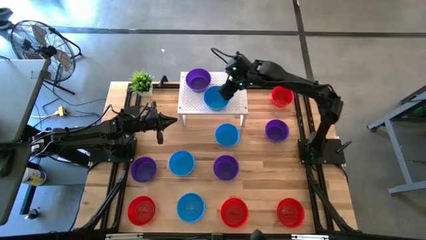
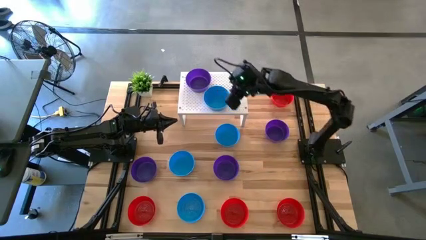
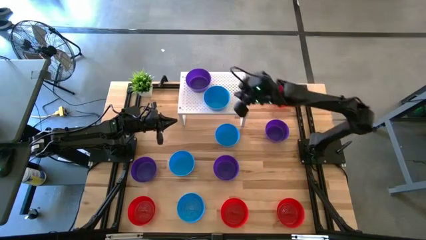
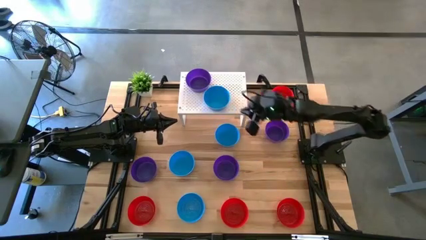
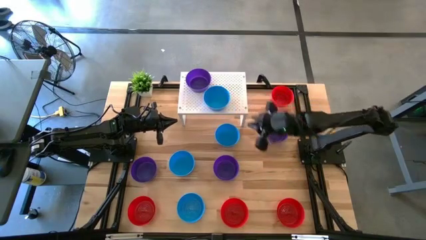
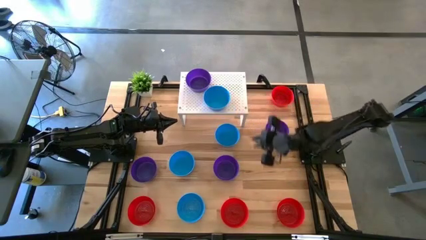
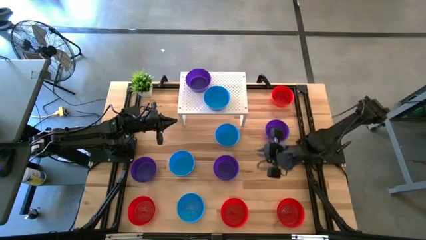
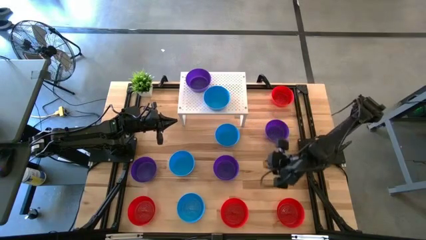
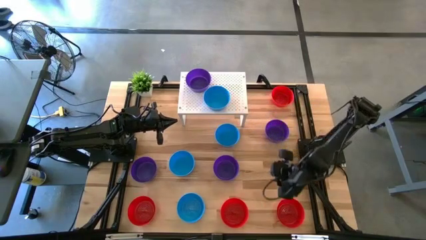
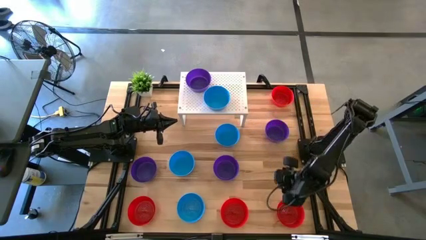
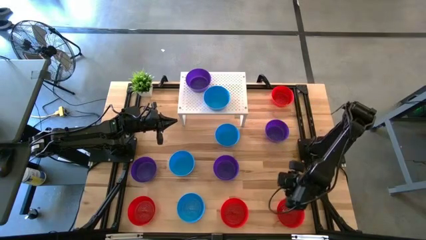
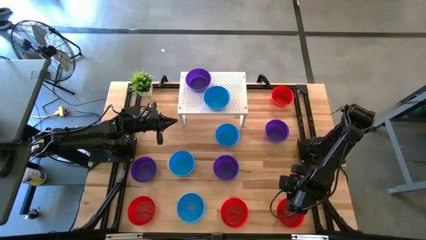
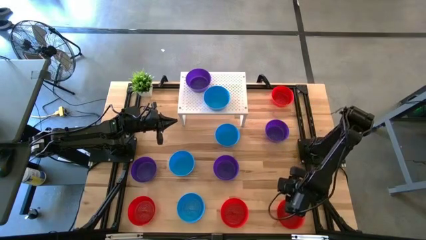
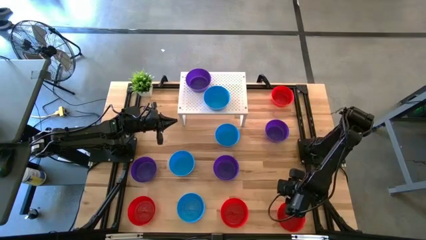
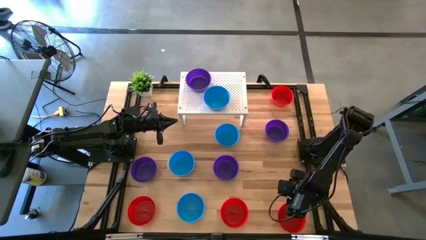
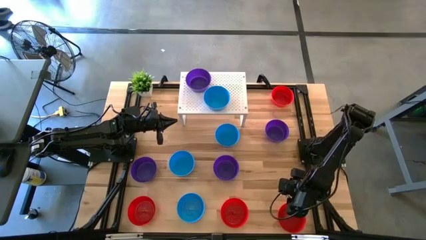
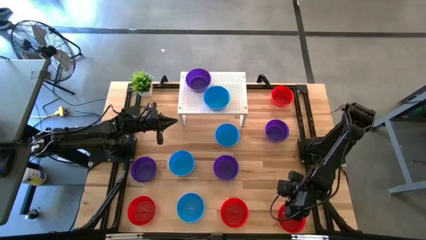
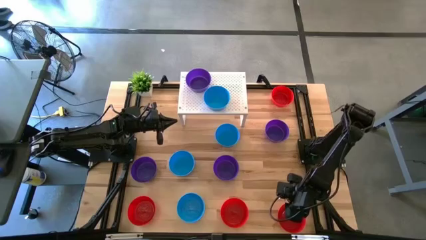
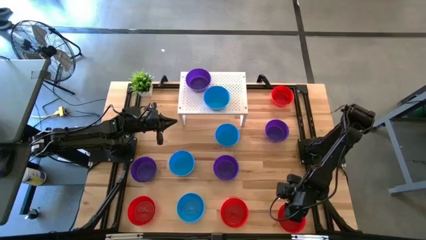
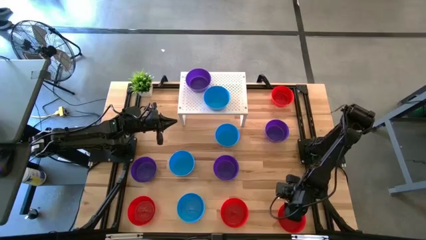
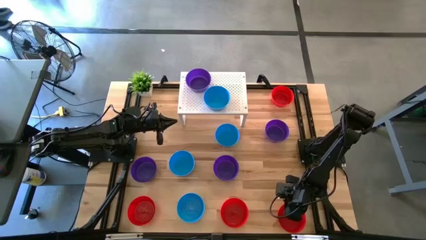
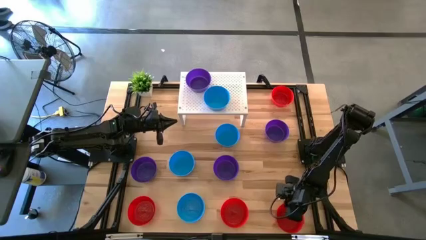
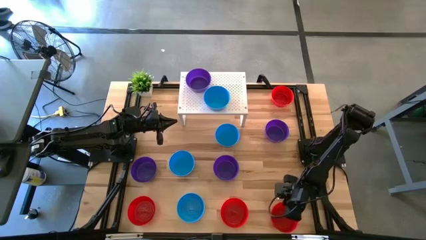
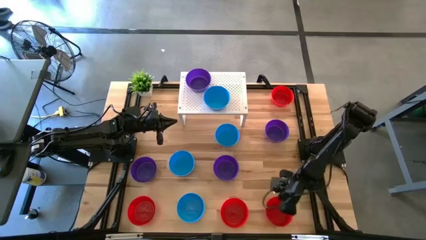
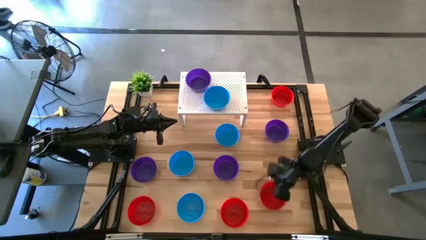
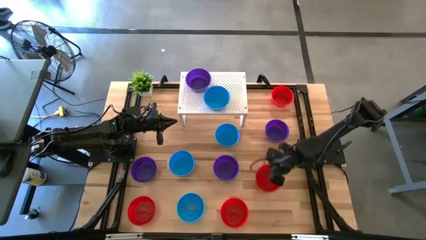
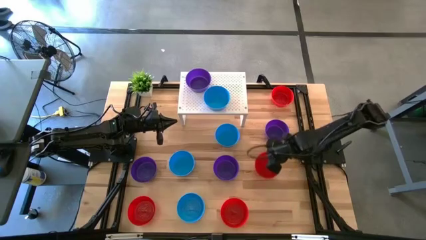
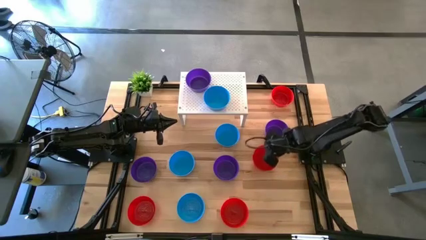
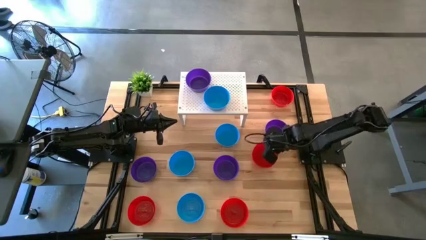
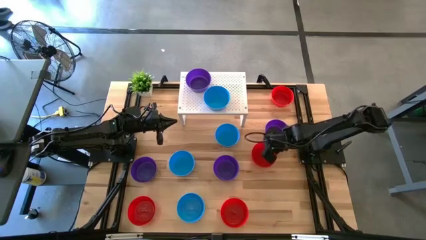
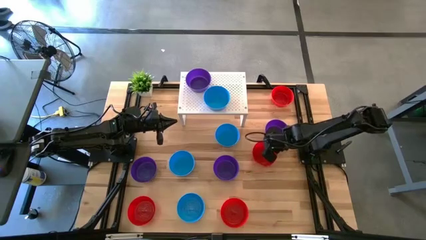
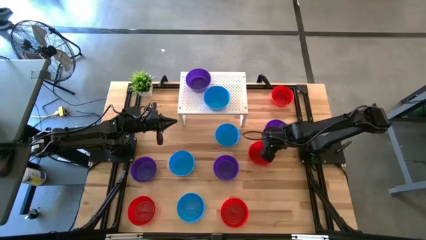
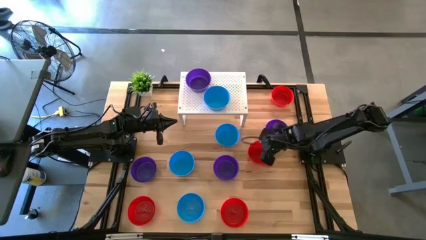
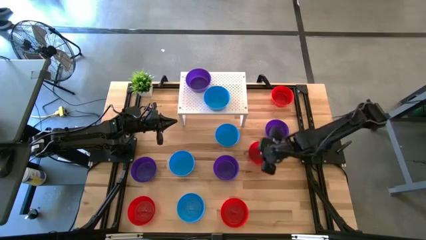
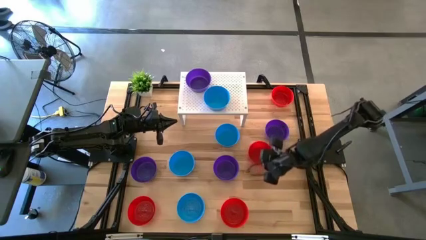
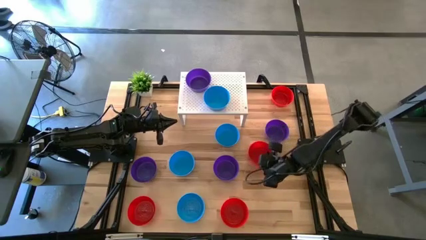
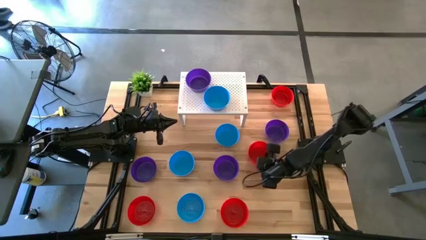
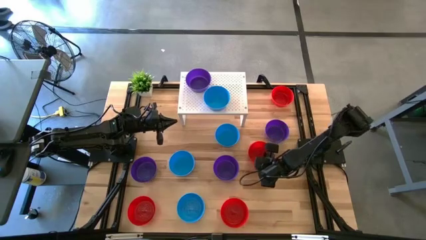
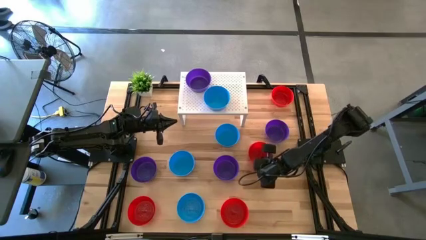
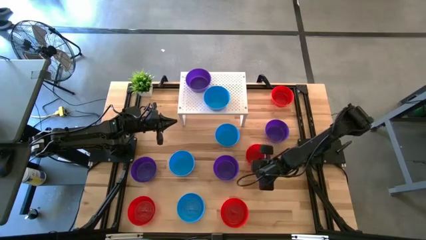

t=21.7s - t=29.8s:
Task: Pick & Place Mini bowls
Put the red bowl on the shelf

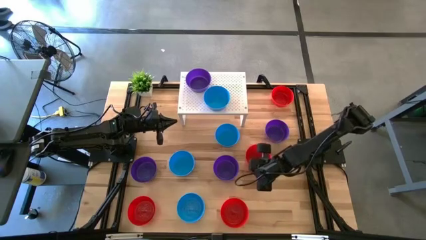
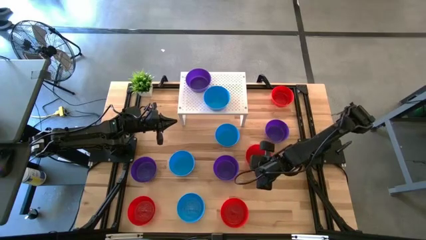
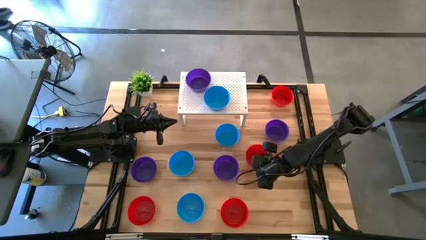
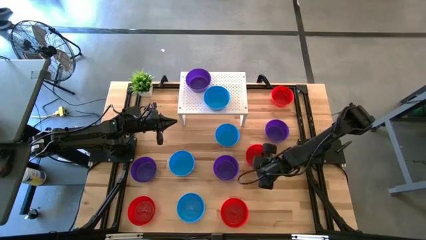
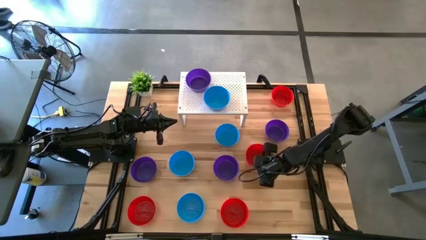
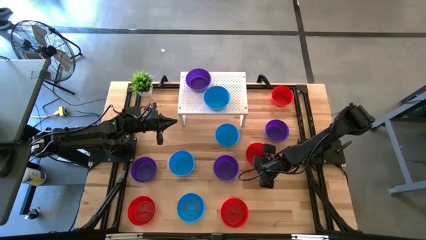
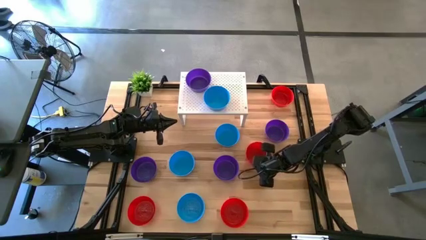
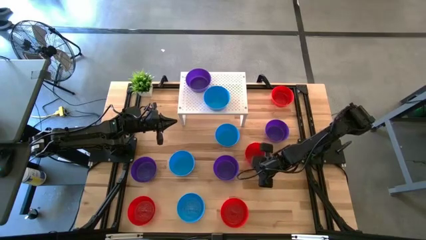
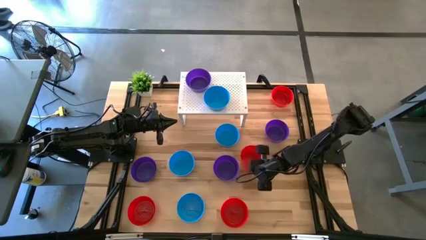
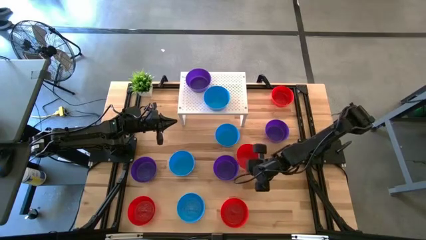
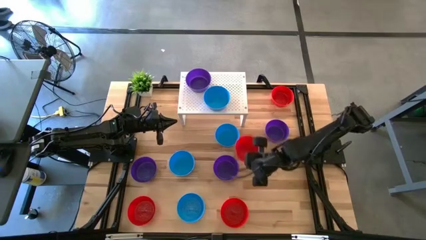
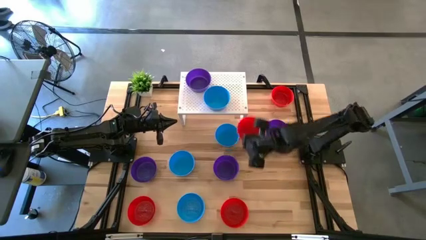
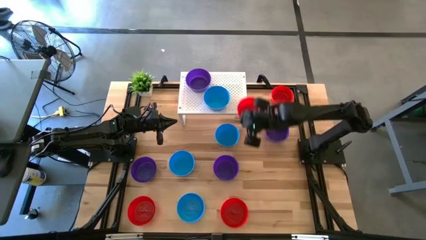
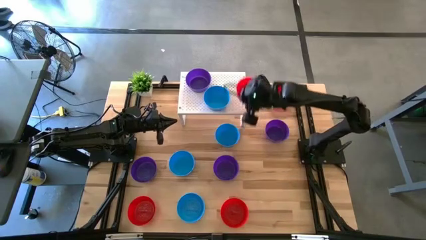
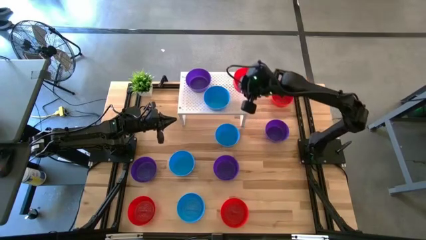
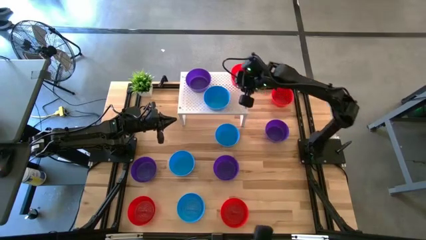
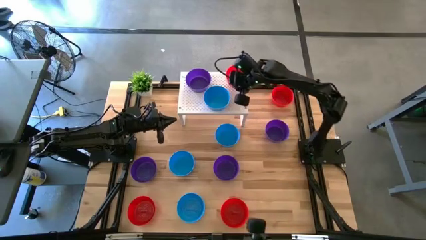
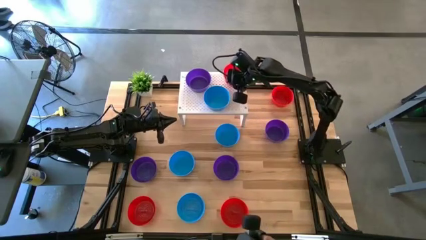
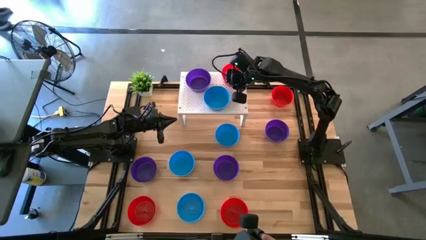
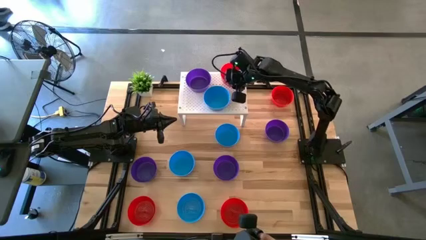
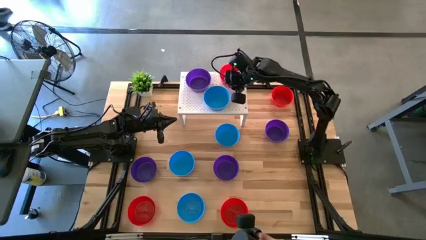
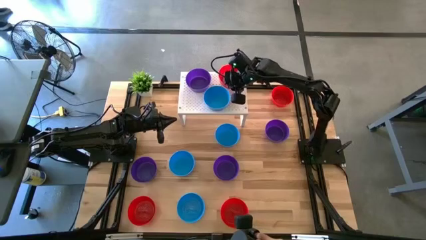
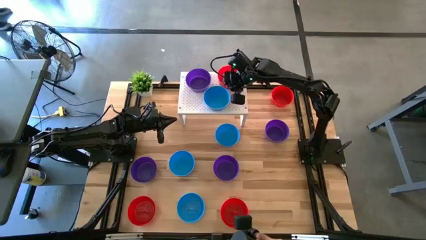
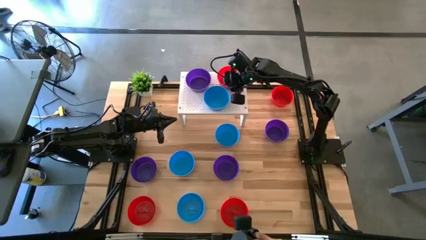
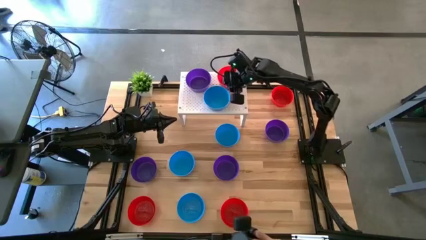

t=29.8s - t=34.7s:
Put the red bowl on the shelf

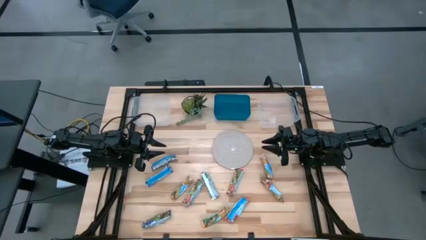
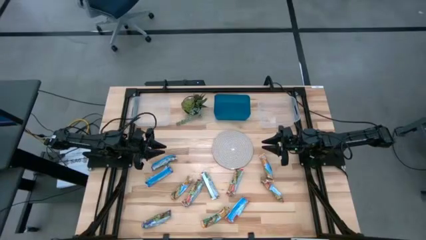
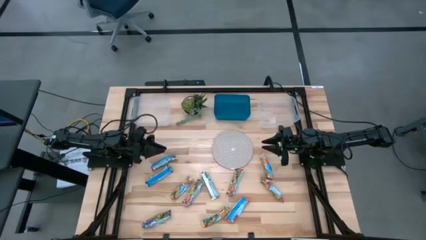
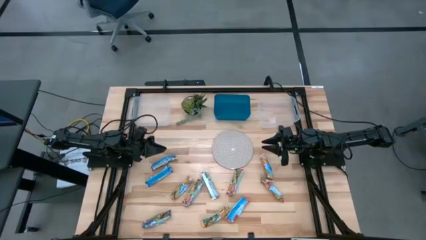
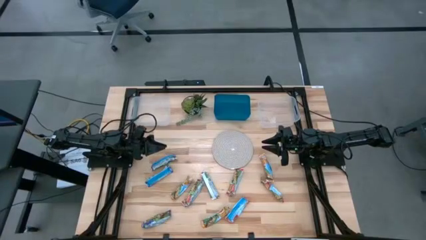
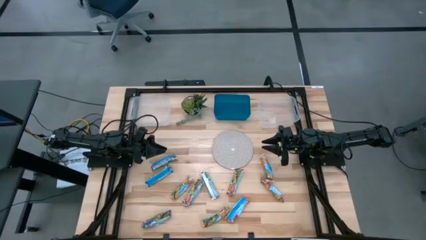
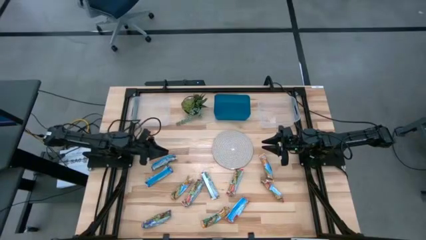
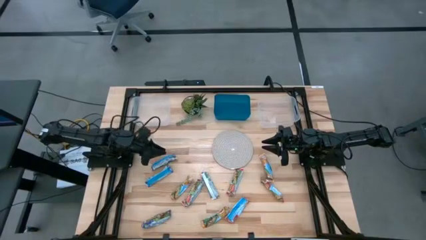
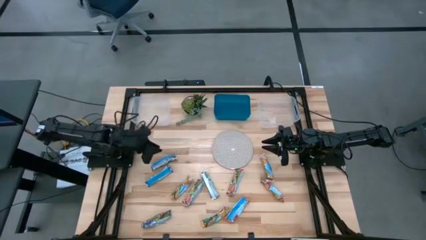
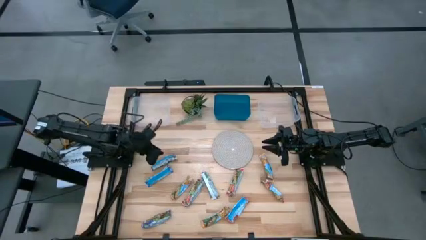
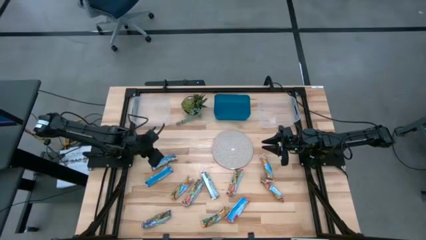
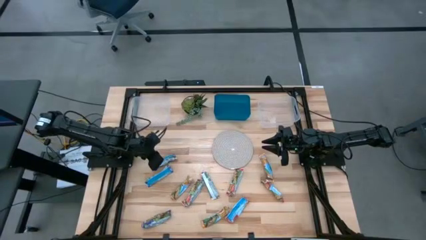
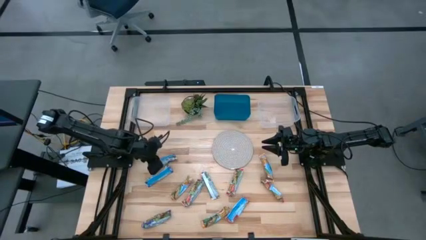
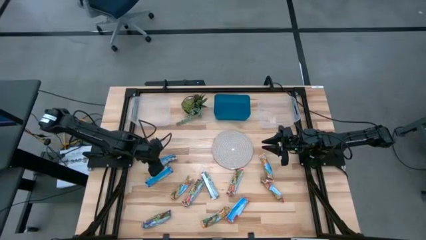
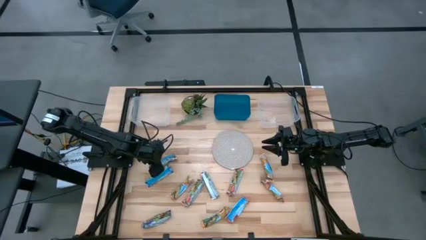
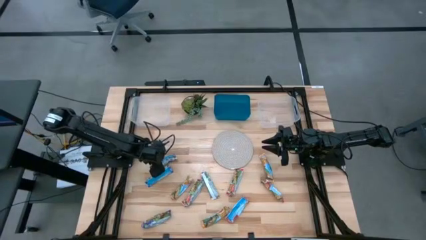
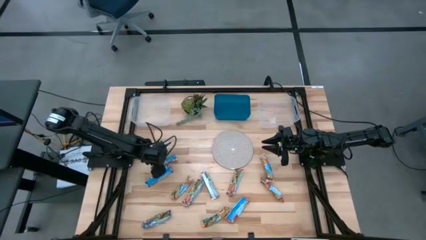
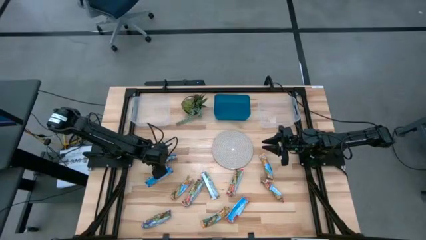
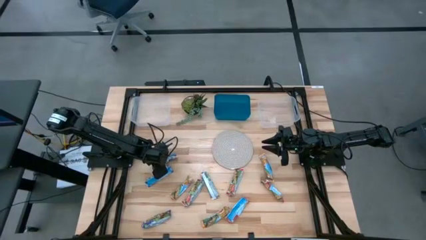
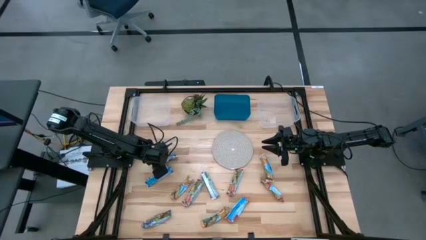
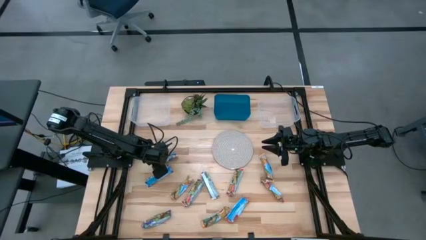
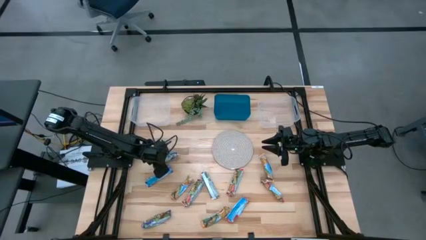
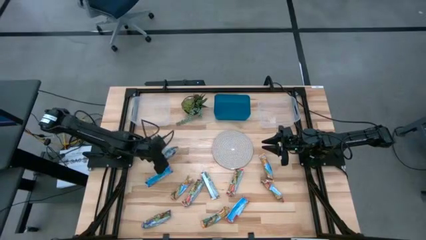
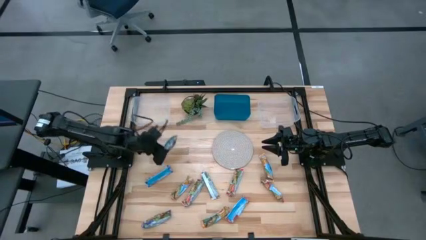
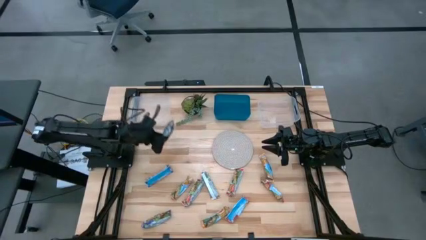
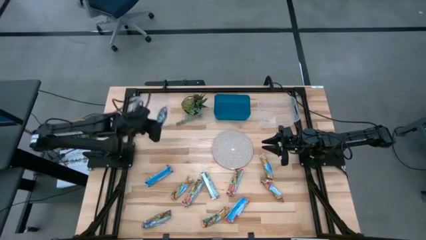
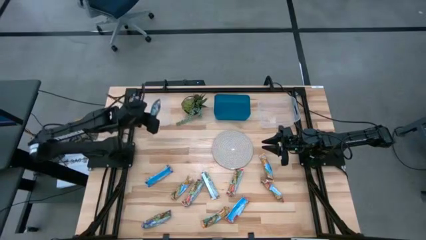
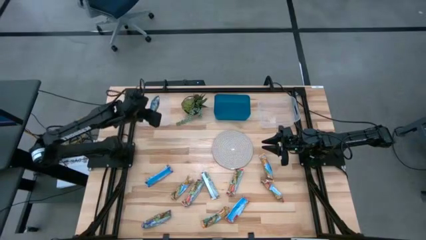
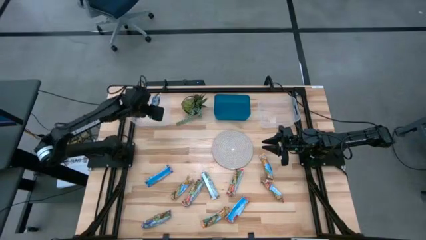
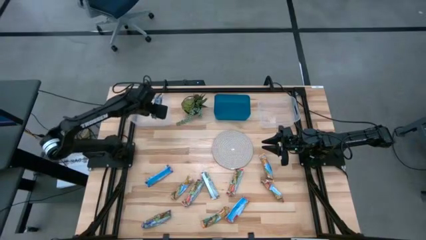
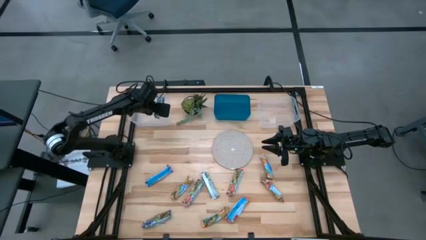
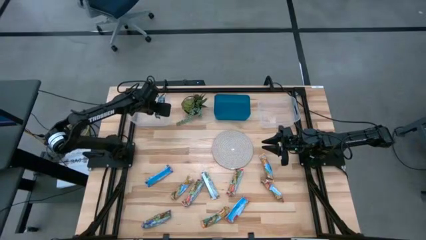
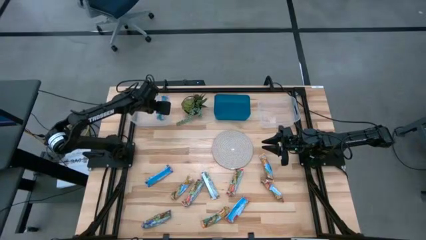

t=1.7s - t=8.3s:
Task: Pick and place Granola Bars by type
Put the blue granola bar into the left transparent bin
